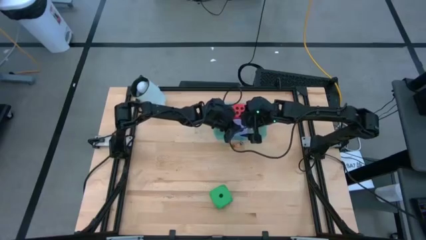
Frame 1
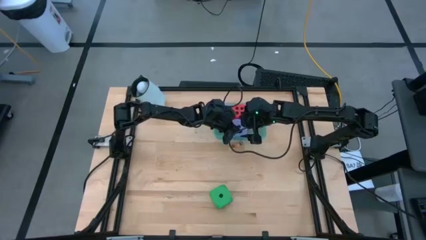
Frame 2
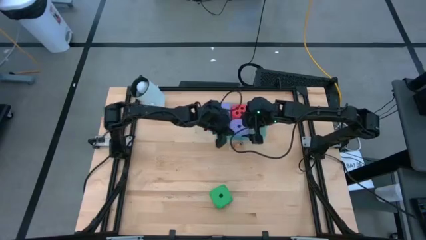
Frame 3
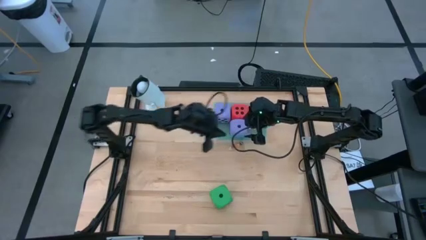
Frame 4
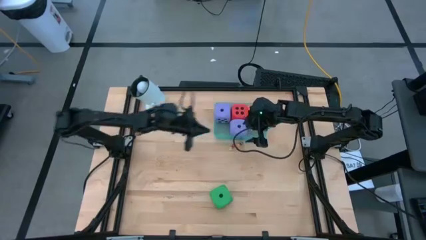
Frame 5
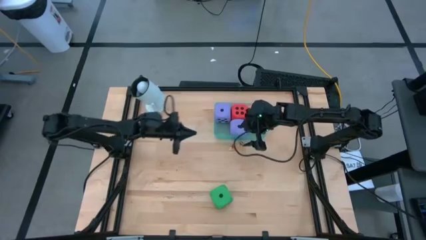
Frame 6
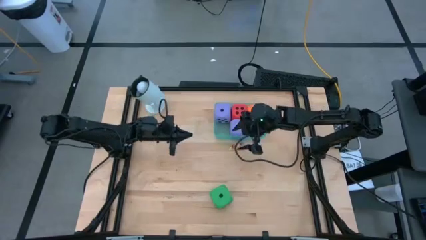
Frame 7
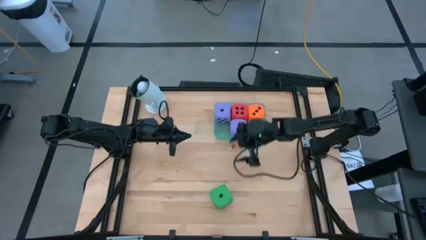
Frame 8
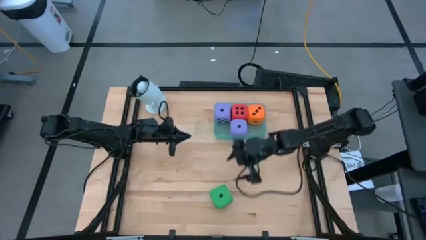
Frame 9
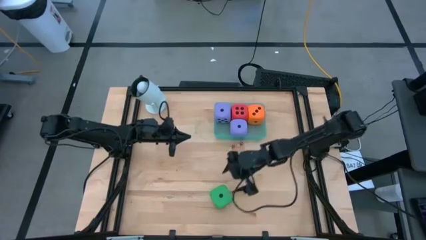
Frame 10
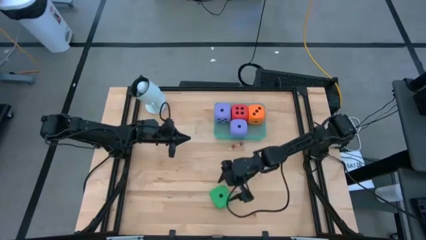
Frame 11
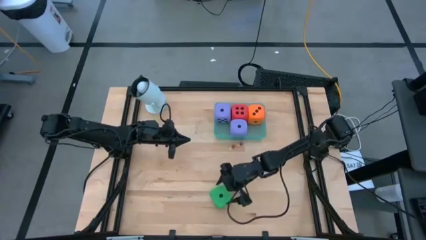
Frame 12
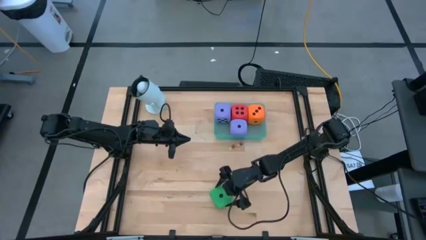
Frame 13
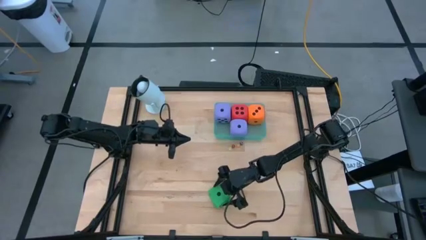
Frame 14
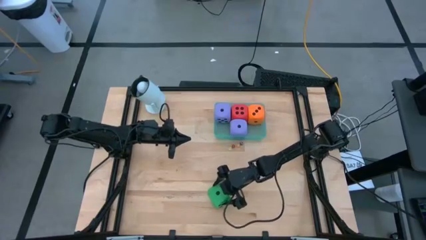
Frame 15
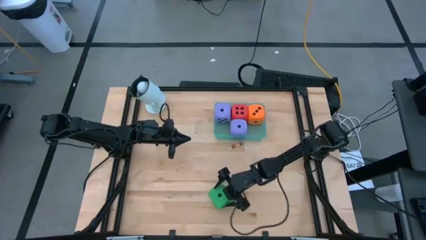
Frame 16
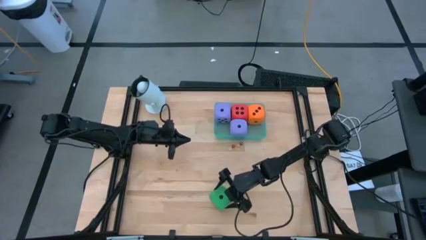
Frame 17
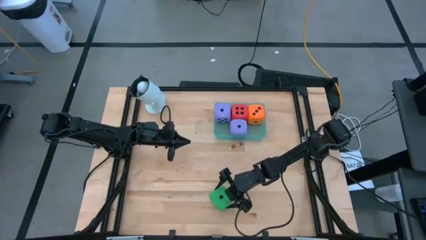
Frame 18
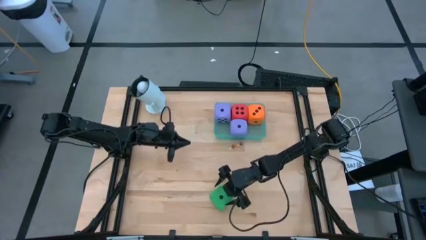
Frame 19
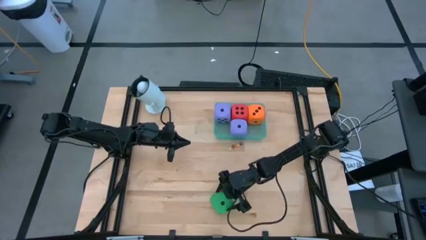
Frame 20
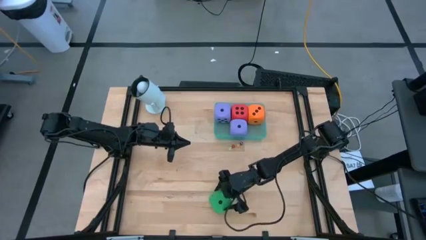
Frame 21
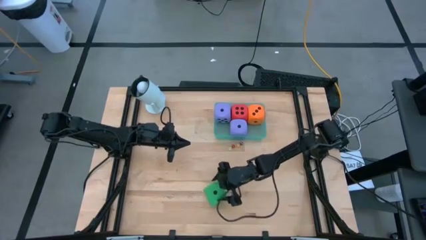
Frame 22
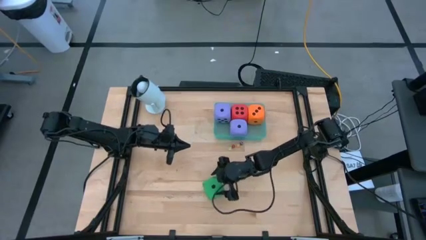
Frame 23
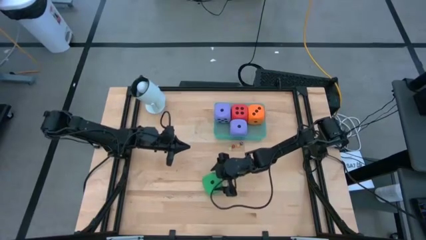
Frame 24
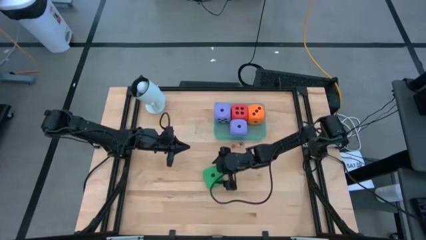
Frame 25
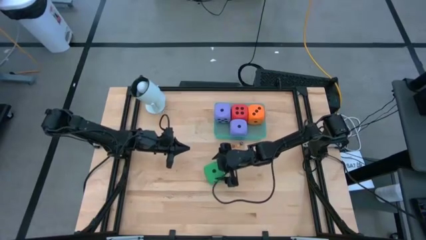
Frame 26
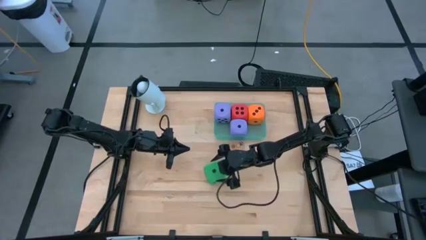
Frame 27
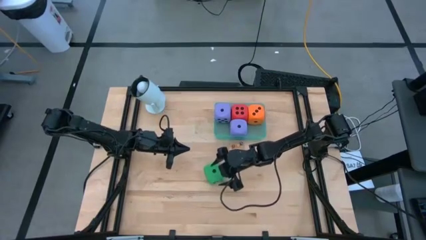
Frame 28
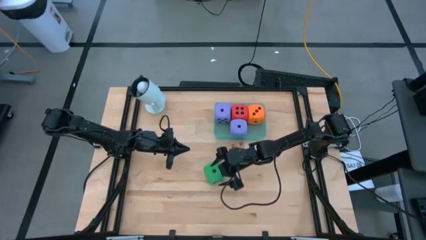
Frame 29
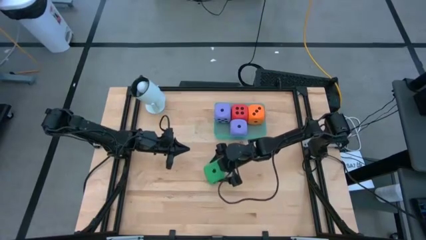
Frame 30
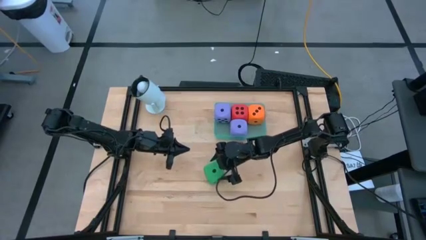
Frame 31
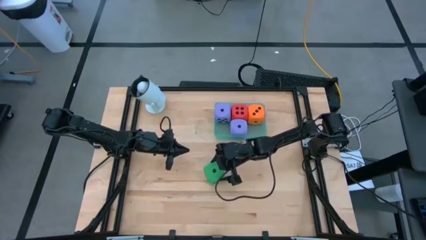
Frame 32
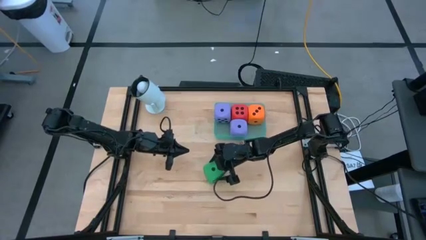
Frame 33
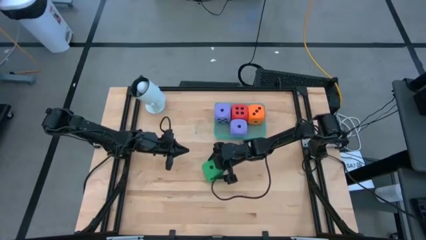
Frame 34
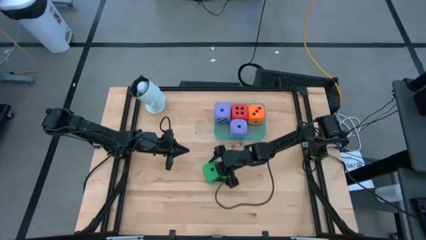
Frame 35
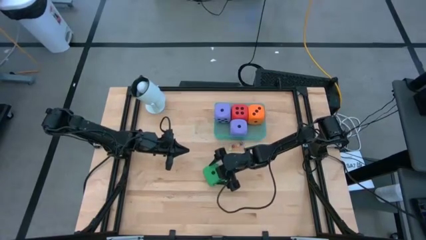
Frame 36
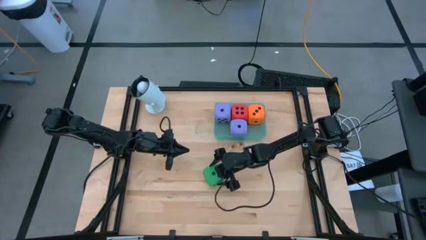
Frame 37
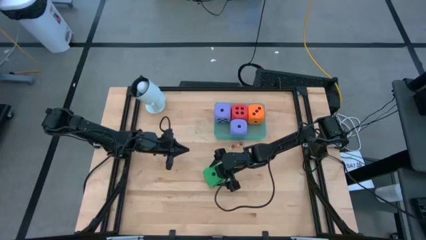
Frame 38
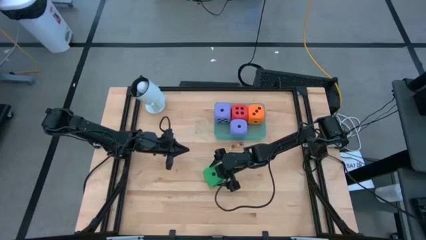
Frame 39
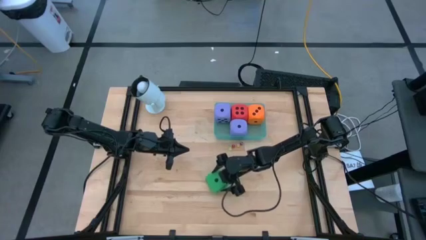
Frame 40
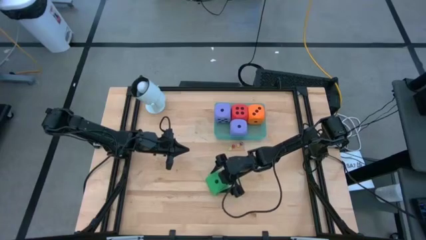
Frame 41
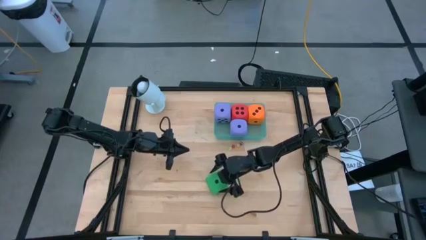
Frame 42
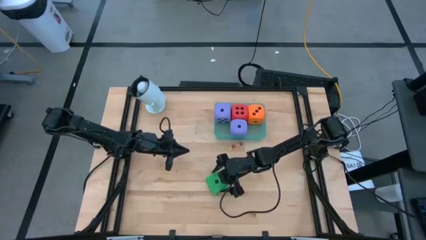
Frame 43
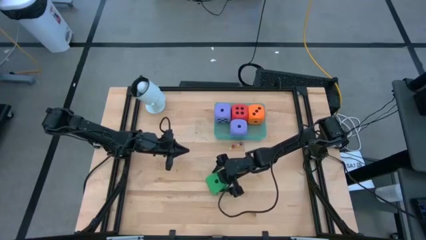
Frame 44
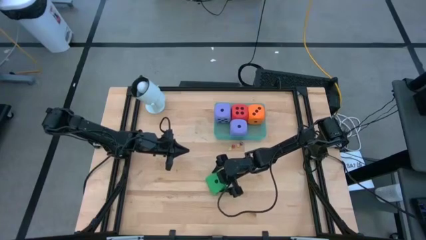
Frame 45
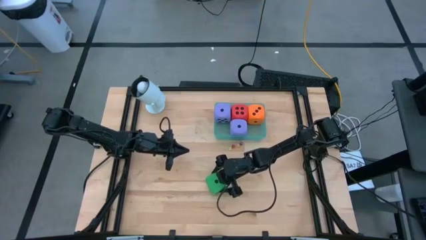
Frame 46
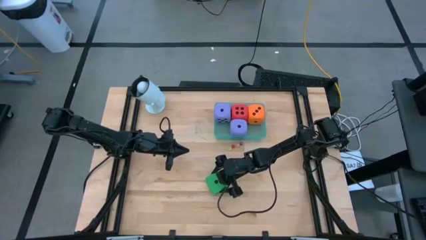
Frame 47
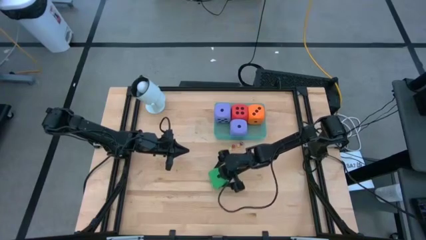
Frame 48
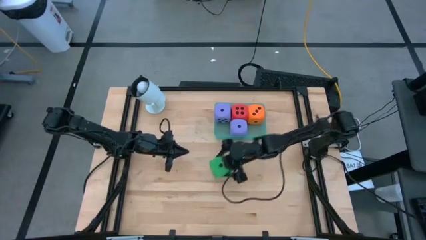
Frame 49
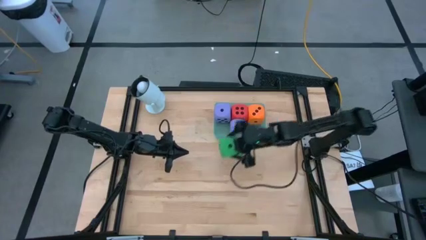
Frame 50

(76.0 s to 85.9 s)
Task: Pick & Place Dice
Put the big green dice into the transparent blue bin
